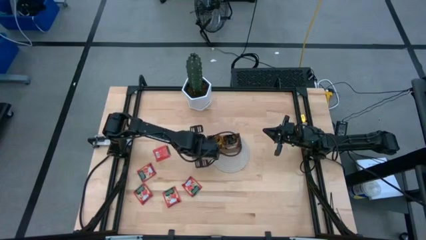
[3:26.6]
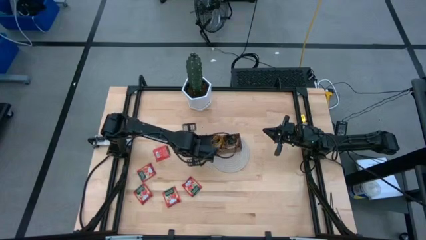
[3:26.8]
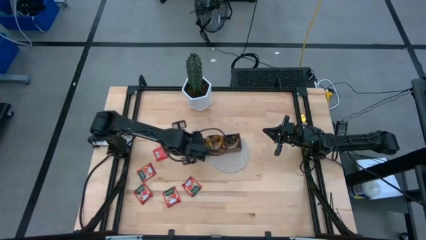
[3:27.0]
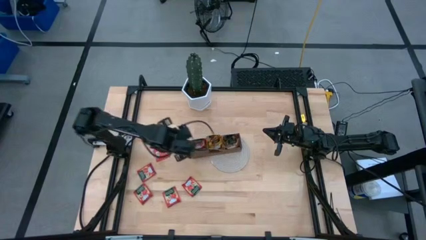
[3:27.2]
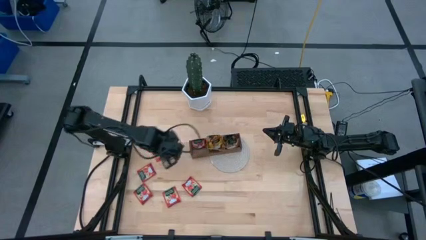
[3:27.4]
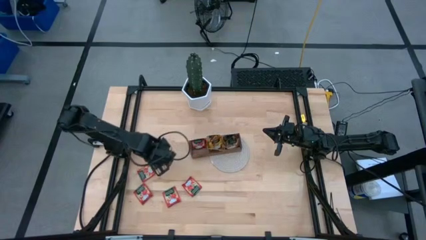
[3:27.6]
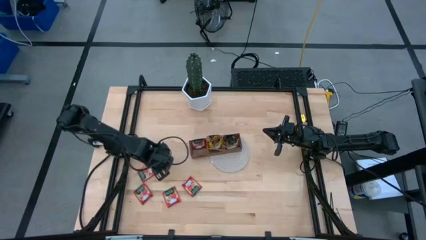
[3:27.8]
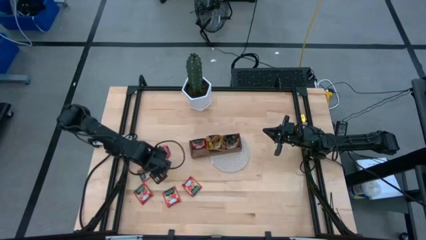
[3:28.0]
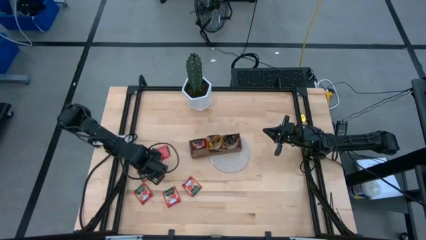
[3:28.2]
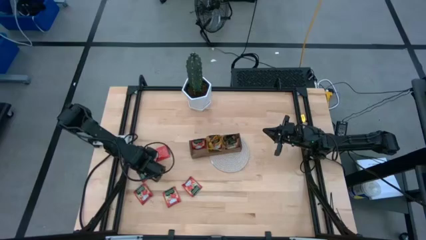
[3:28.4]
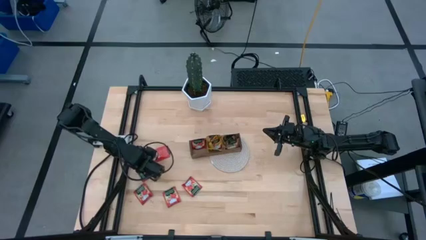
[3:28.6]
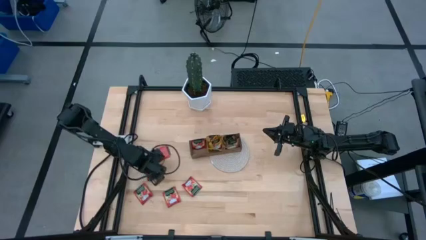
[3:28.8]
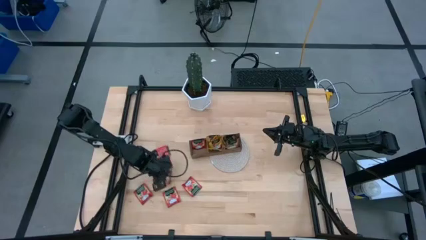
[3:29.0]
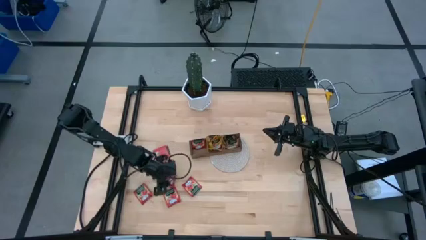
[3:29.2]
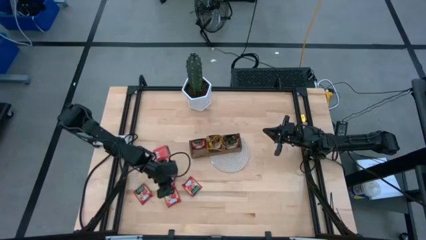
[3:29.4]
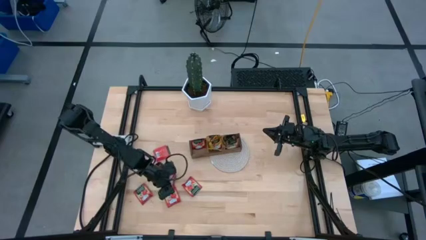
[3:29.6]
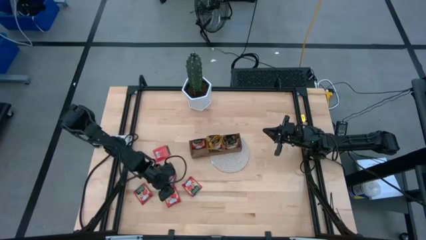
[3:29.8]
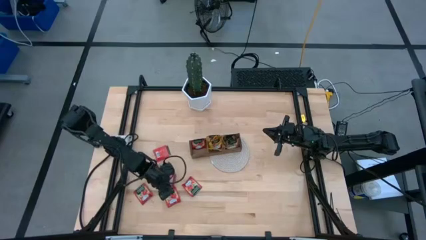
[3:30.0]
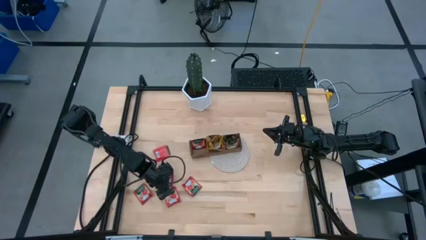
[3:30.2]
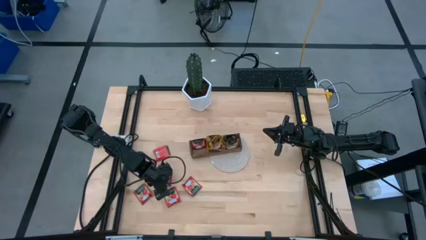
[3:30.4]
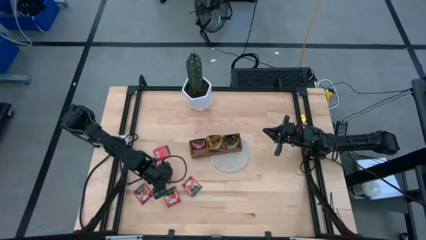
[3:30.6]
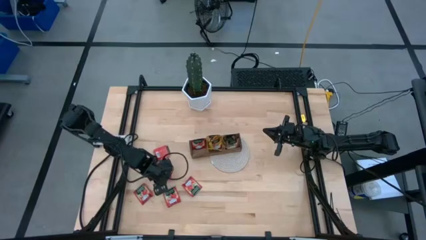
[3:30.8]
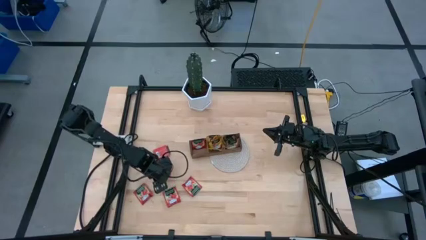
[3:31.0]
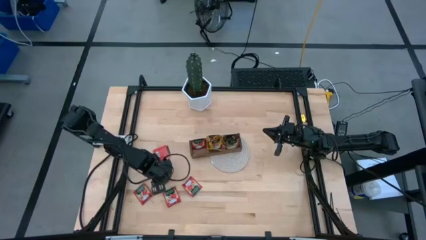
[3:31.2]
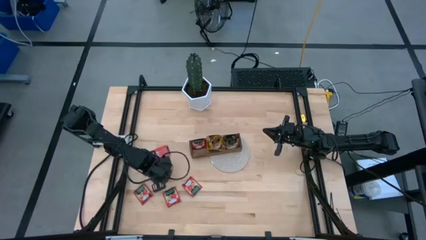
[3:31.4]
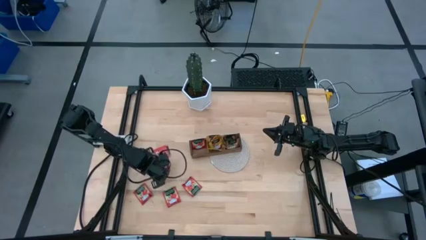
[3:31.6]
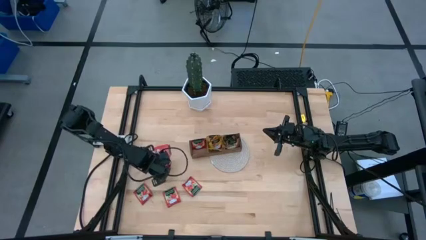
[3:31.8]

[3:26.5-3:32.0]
Task: Pick & Place Tea
Put the red tea bag into the left section of the wooden organizer

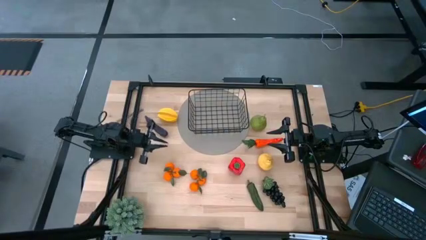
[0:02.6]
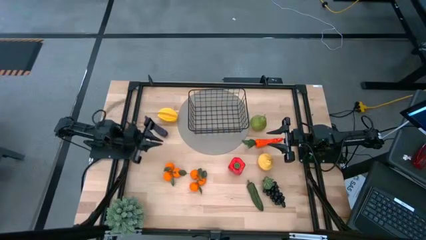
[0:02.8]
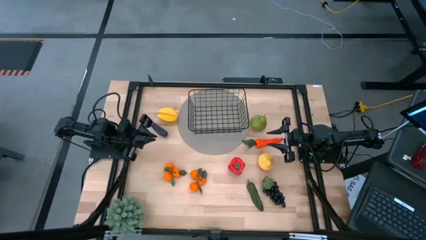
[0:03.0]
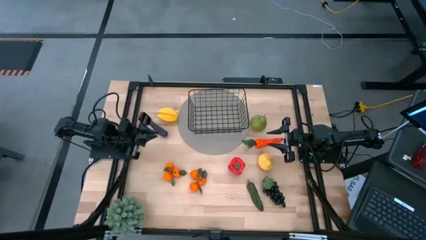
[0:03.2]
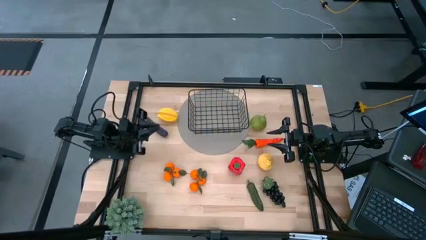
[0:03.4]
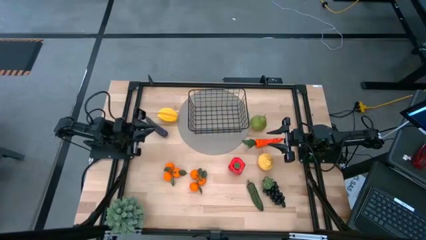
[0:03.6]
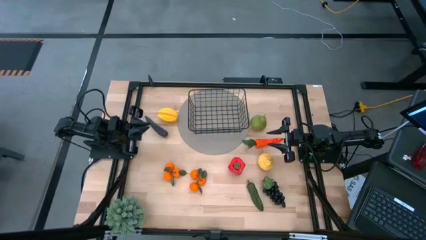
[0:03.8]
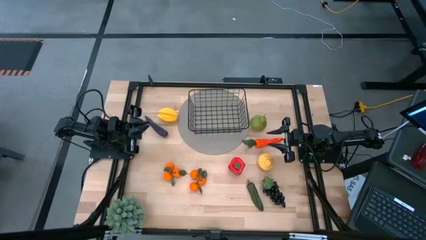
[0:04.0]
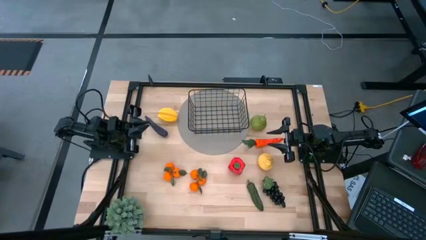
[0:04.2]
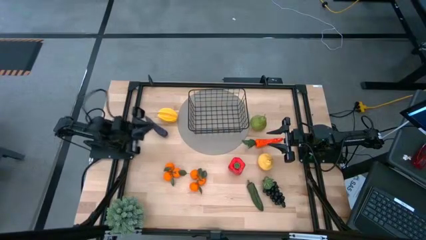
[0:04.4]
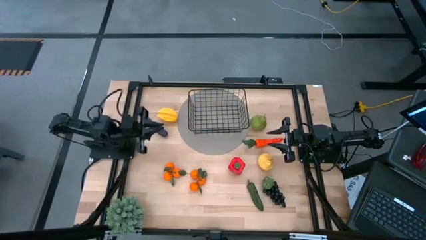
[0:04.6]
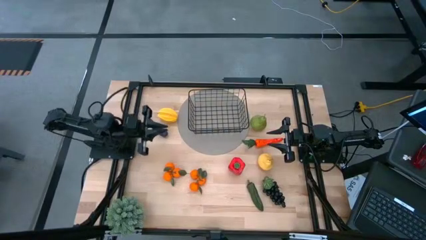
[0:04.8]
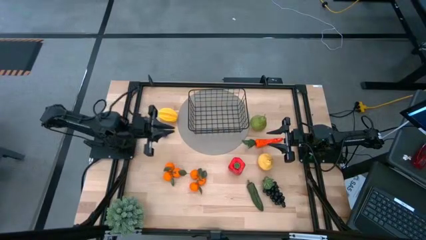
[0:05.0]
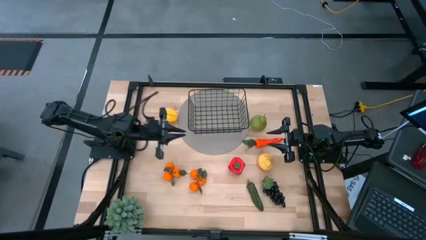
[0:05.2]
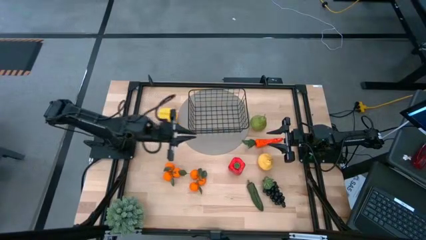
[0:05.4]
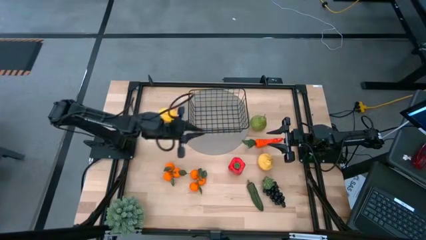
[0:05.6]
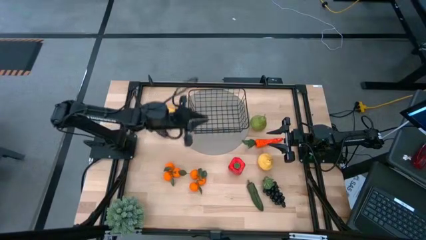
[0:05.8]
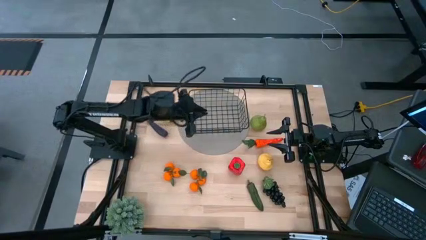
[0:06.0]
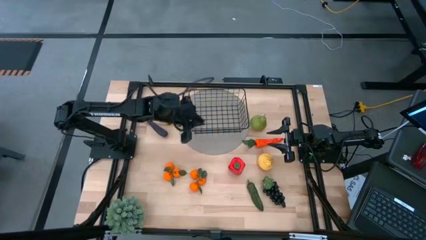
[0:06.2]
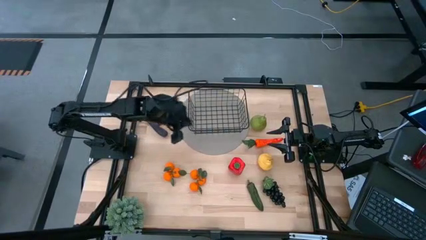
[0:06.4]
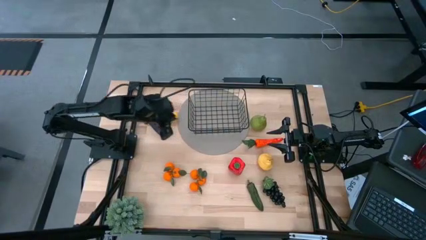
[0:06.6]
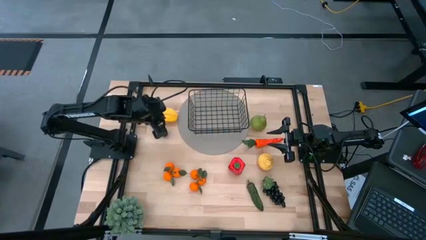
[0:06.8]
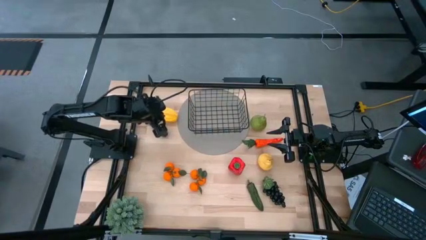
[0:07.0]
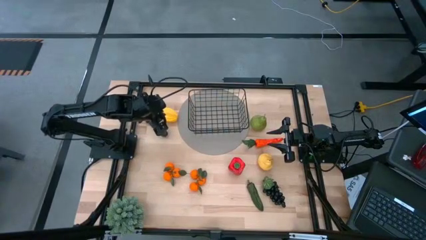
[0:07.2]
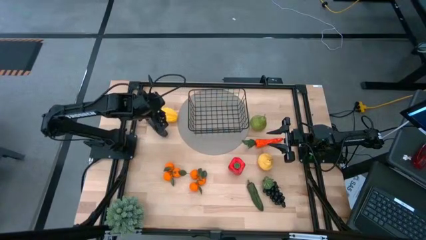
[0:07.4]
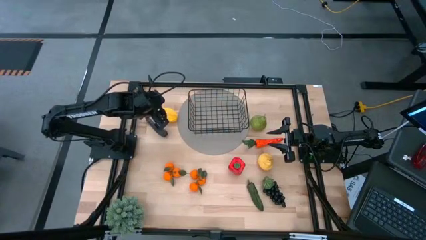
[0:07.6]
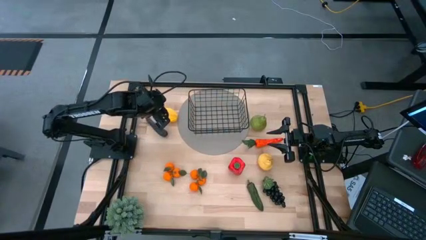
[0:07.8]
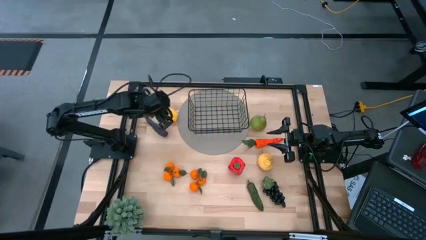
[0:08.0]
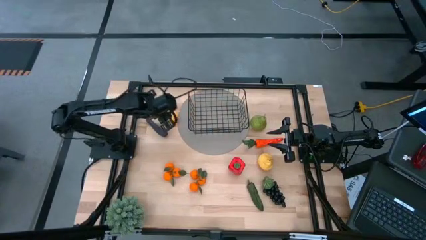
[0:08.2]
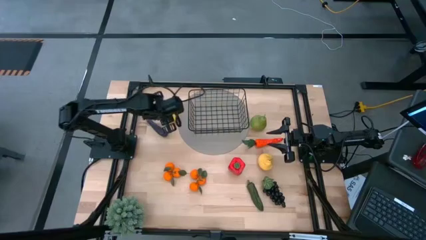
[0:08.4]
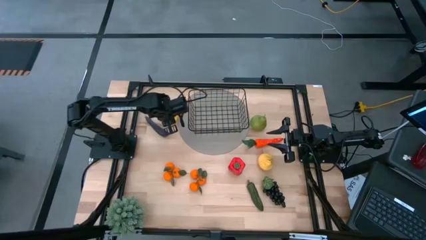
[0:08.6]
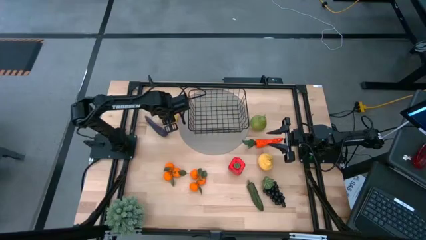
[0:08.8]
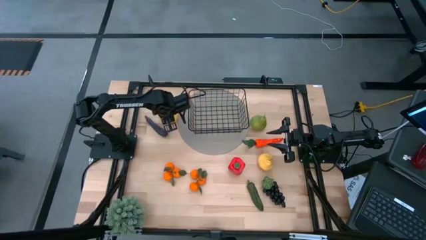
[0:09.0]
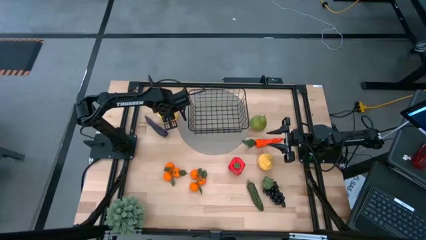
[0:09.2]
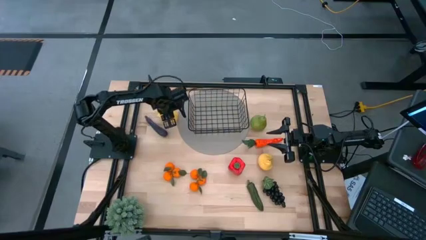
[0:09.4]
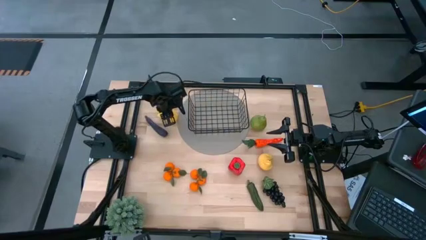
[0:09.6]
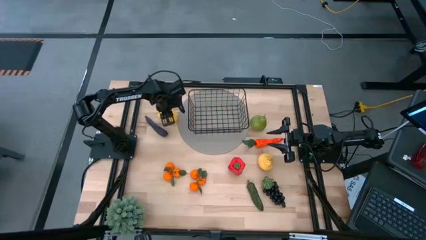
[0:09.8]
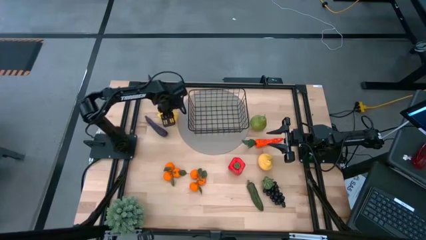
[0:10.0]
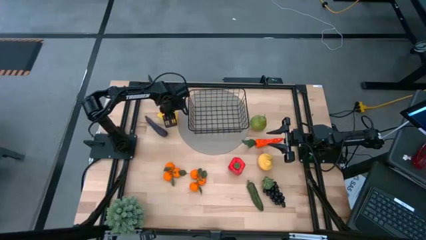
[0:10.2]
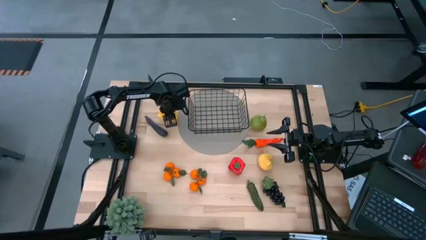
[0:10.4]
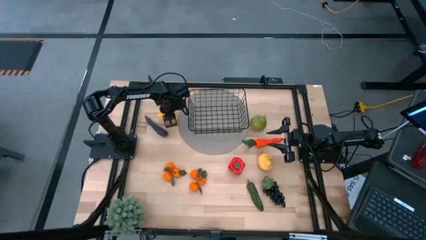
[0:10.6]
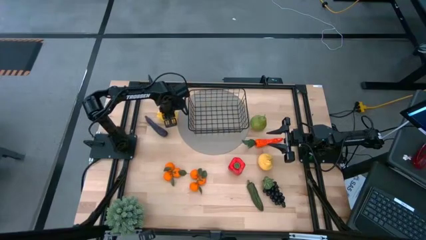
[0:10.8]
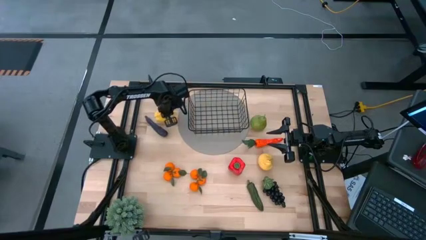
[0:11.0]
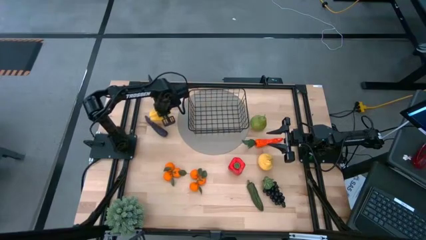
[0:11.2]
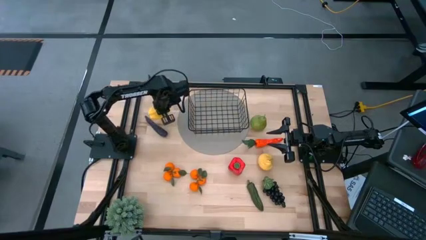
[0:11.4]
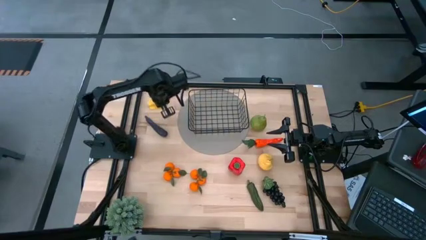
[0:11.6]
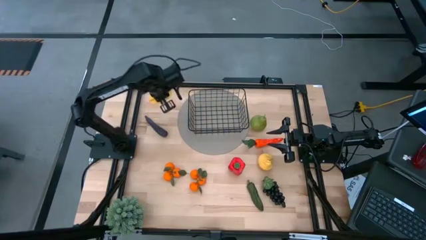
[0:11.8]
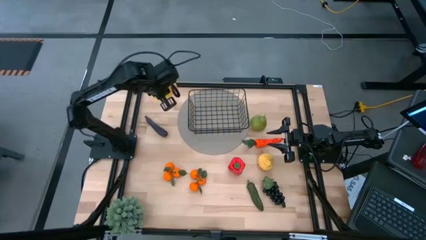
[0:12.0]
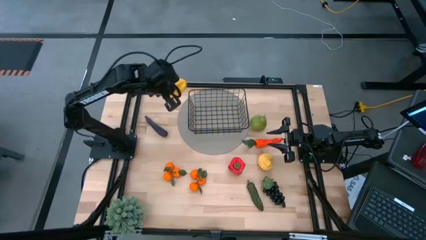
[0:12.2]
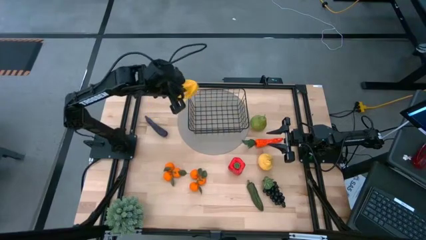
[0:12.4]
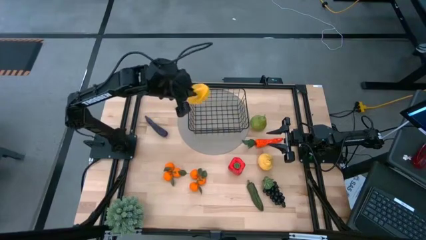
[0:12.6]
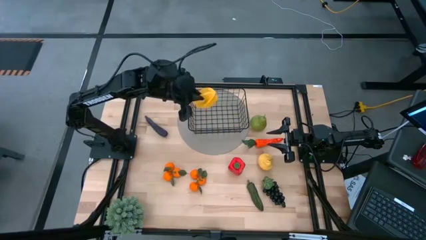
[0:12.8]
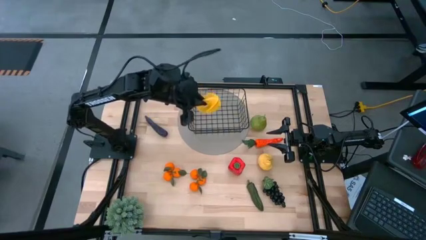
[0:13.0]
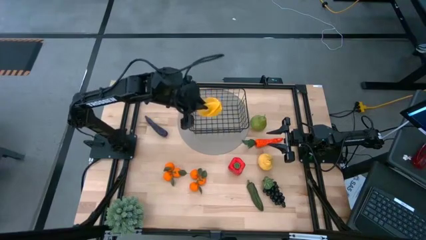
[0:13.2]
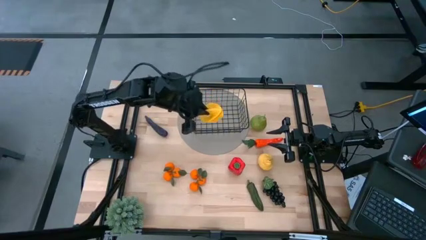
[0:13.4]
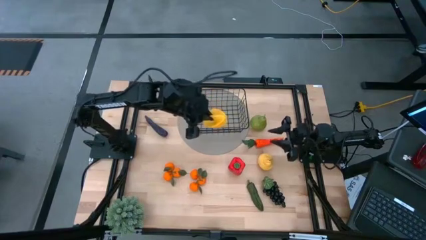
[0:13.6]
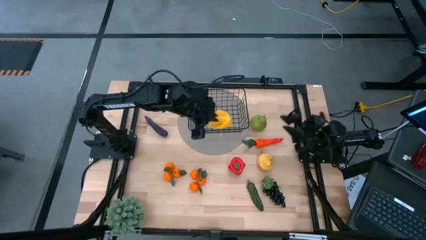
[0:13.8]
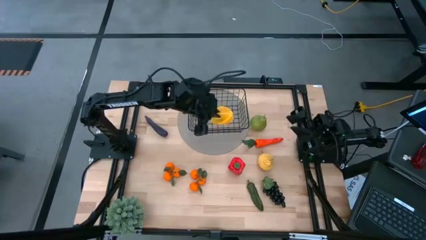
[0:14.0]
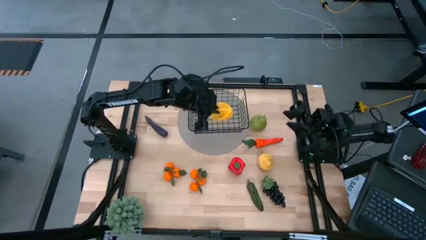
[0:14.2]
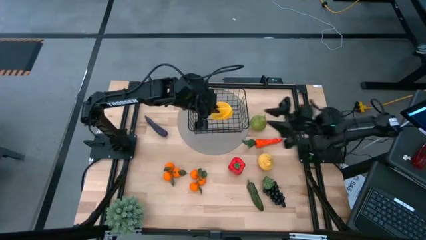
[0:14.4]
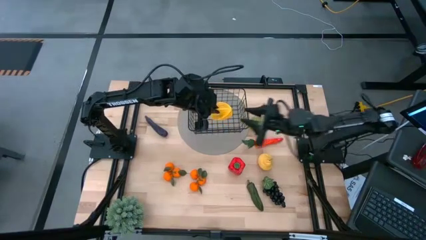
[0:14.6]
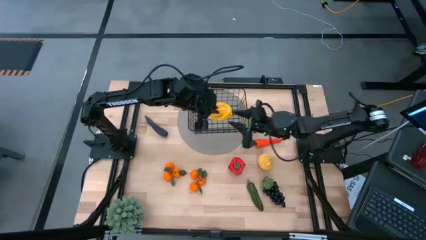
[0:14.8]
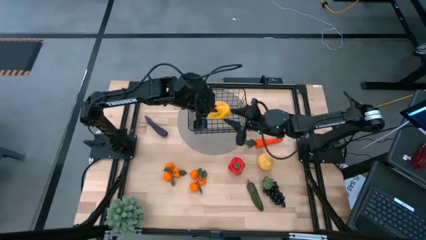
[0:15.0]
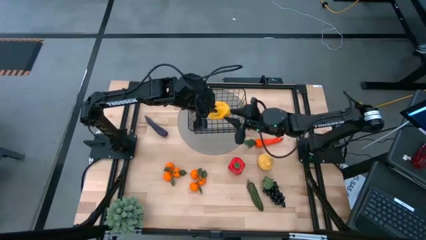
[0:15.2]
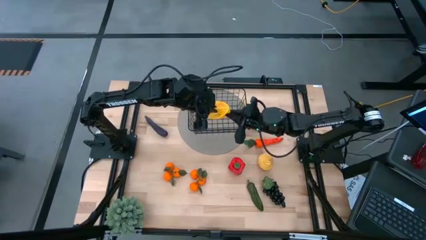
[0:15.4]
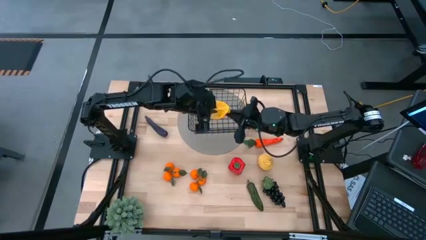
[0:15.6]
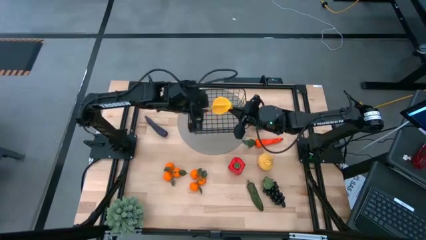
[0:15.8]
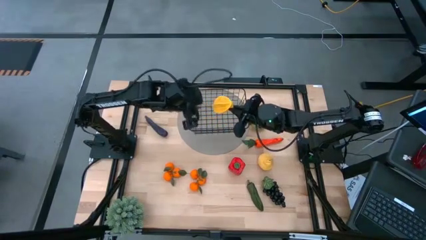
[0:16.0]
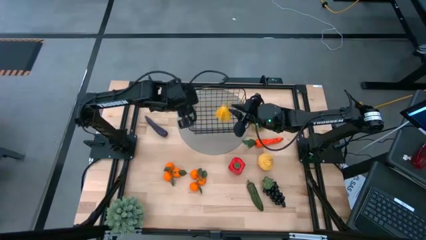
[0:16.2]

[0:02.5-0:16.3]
Task: Build produce basket
Put the yellow starfruit into the black wire basket
